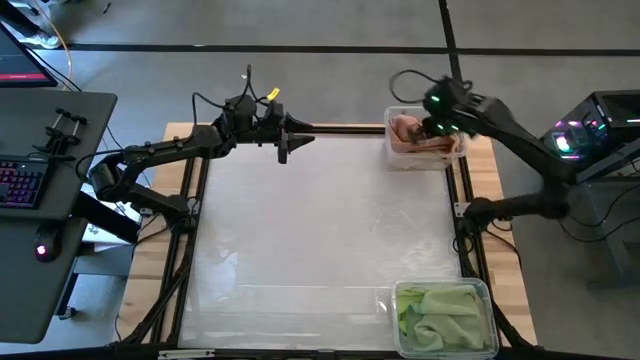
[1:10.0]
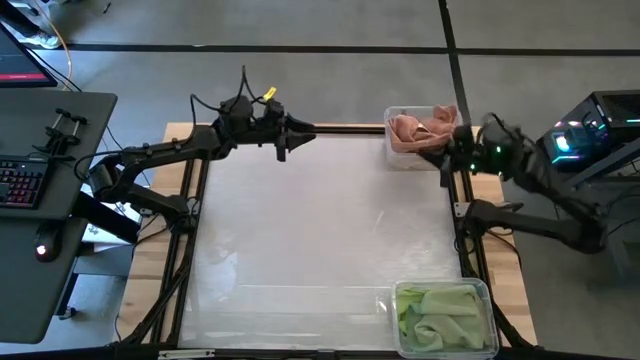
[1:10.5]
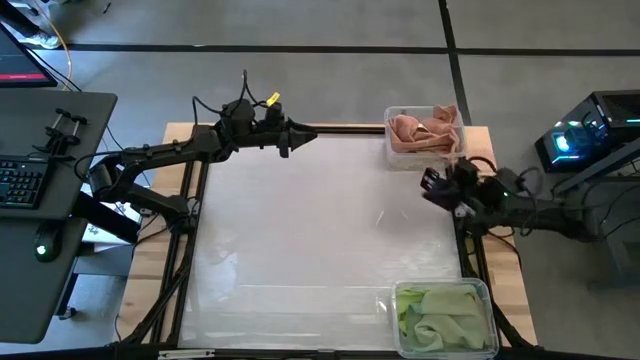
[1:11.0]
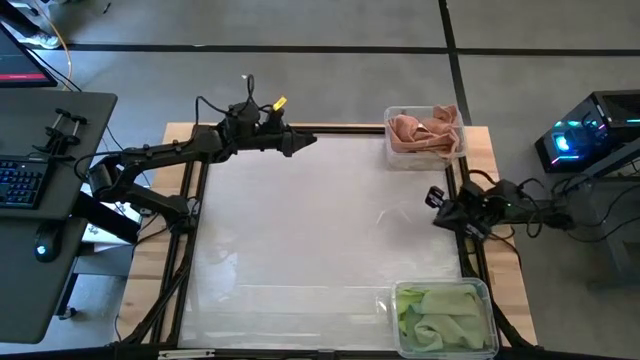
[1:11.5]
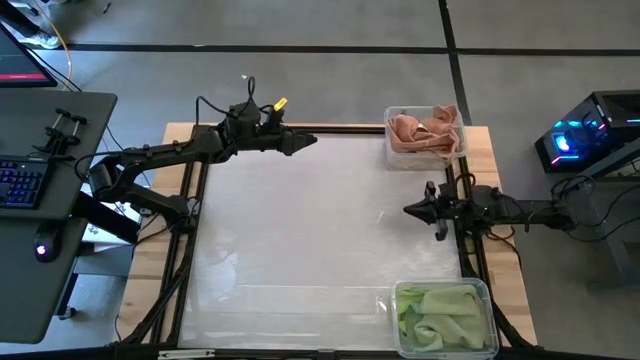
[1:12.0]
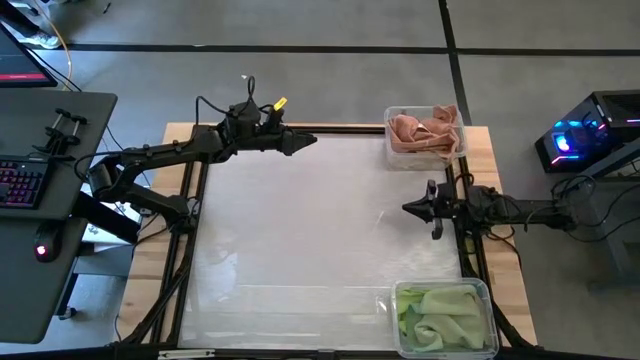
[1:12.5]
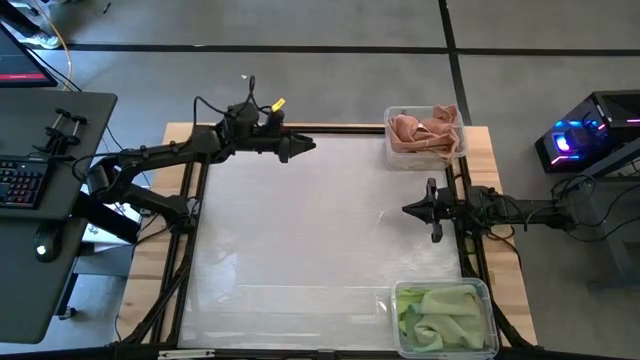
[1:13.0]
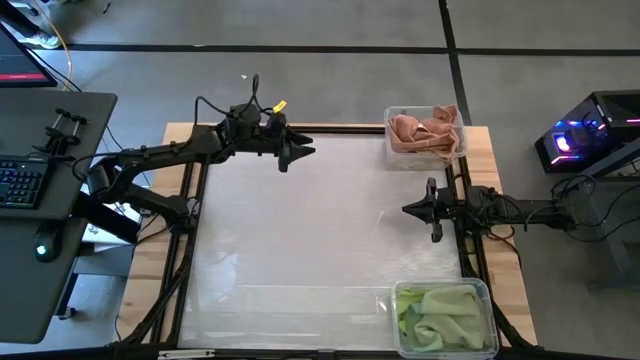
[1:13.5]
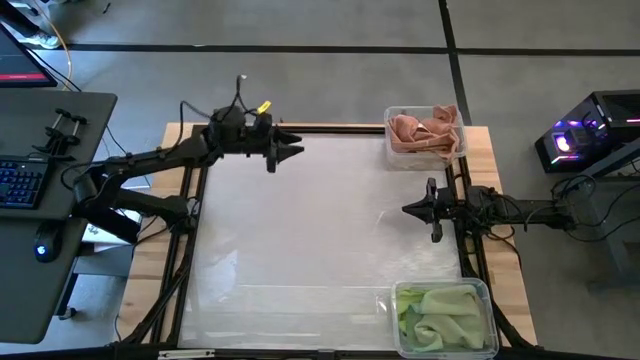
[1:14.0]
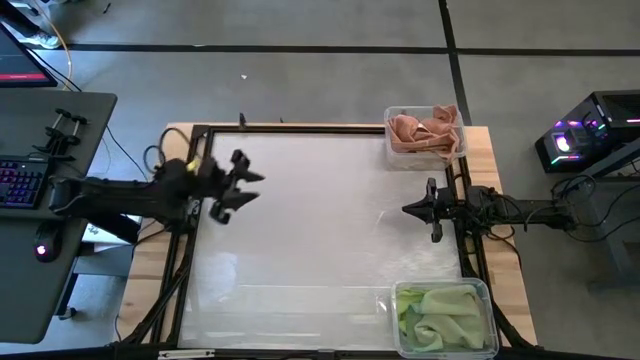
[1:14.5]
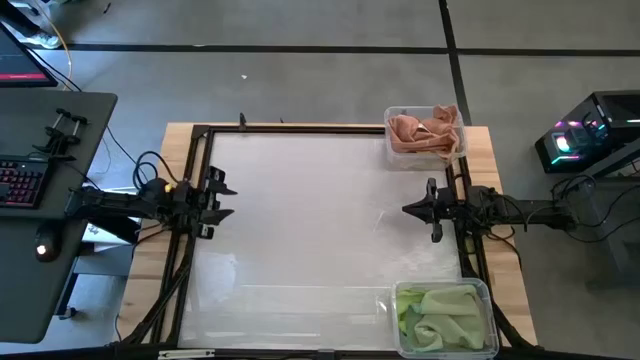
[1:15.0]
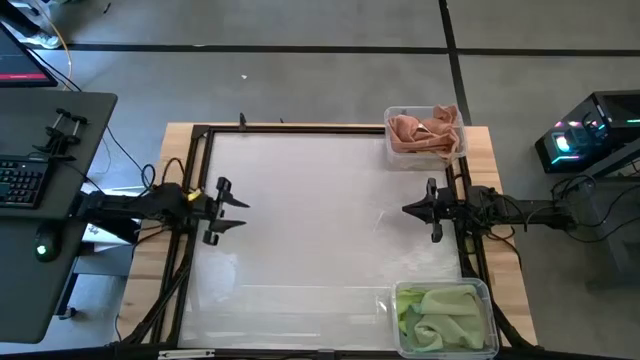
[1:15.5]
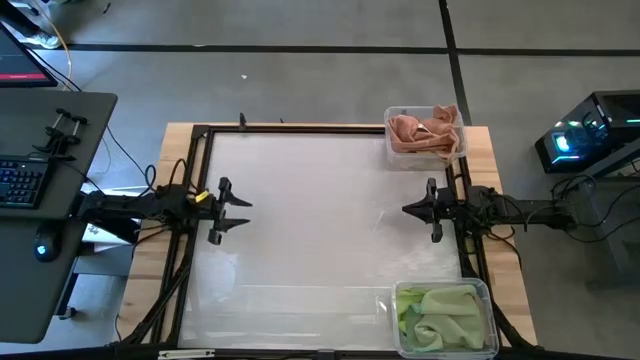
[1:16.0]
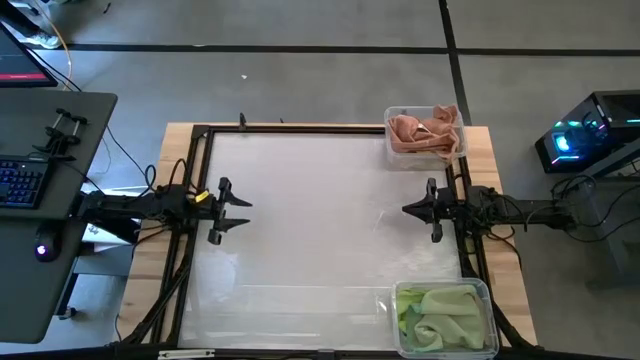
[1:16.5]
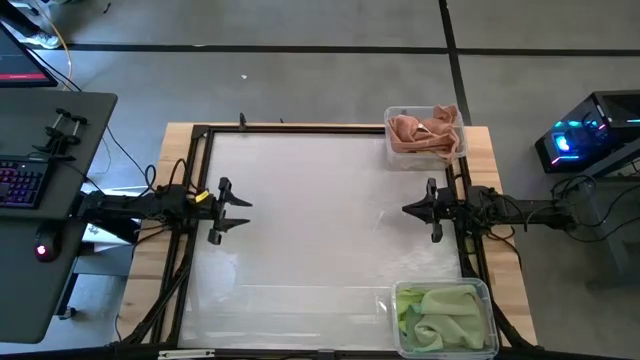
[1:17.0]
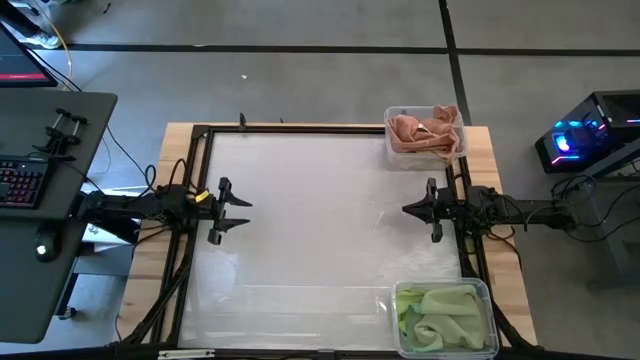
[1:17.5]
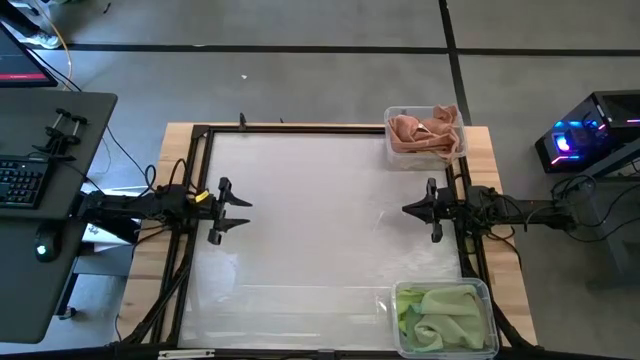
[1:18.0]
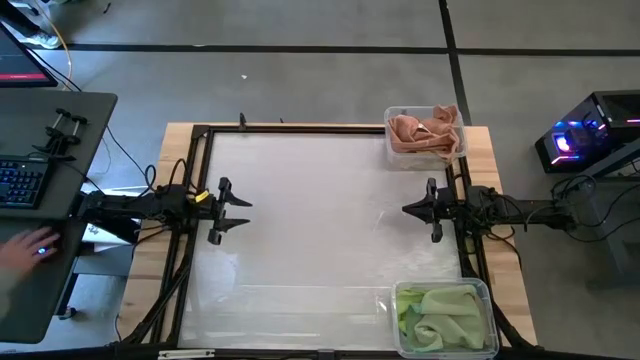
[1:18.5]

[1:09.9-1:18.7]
Task: Sort towels by color in basket
Return to Home Position

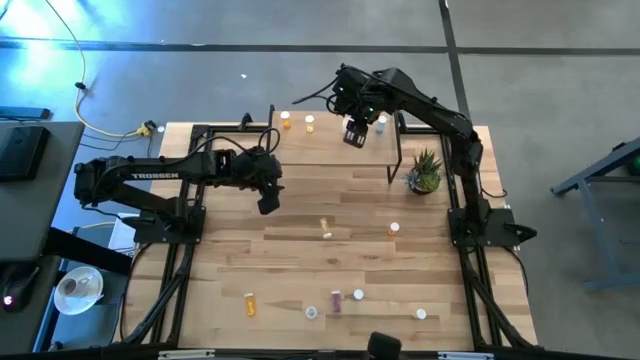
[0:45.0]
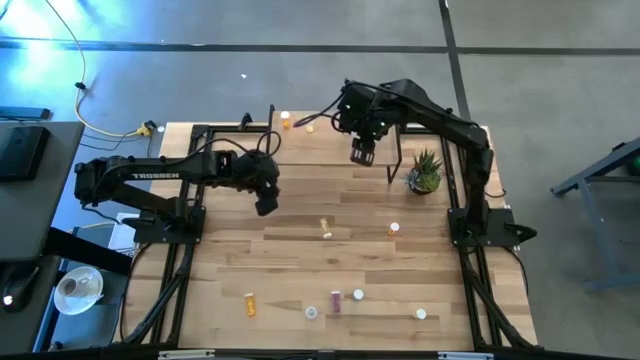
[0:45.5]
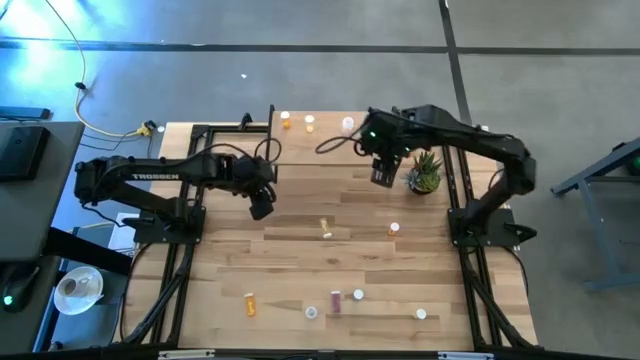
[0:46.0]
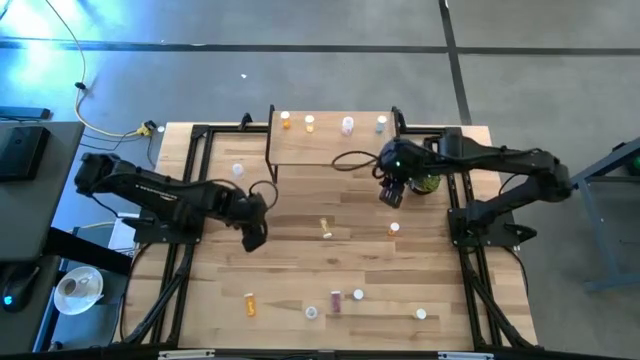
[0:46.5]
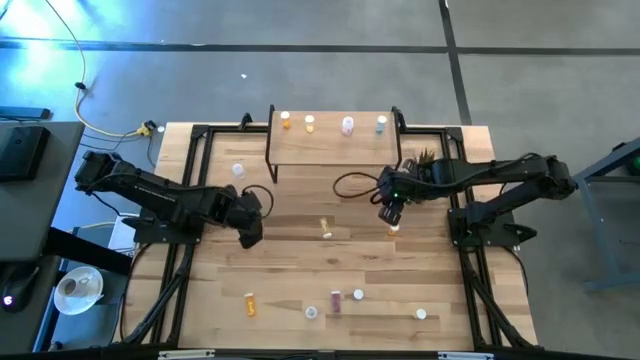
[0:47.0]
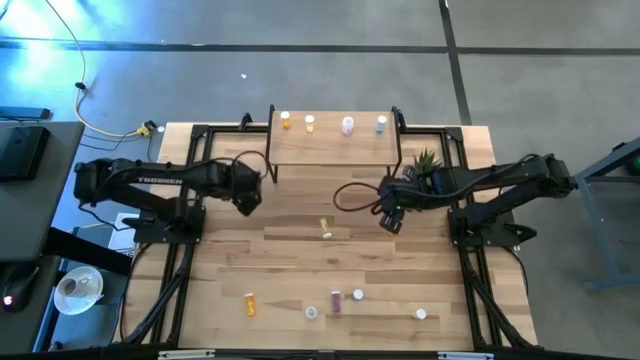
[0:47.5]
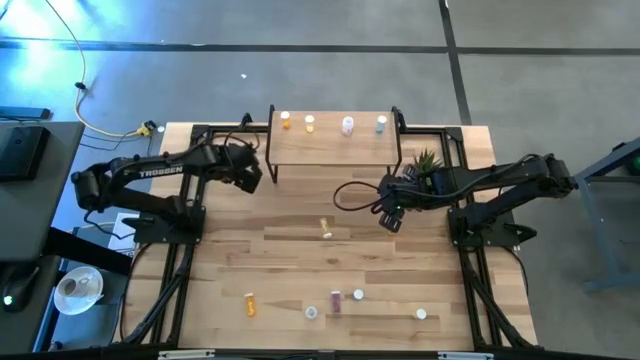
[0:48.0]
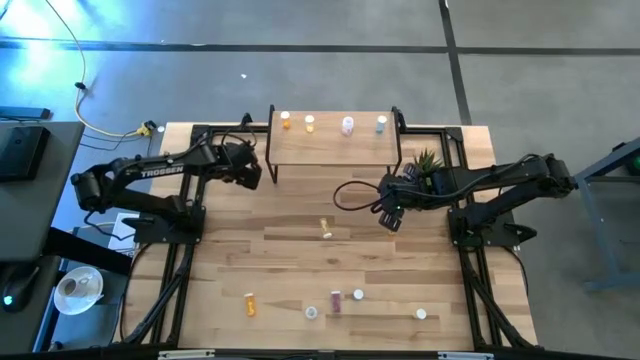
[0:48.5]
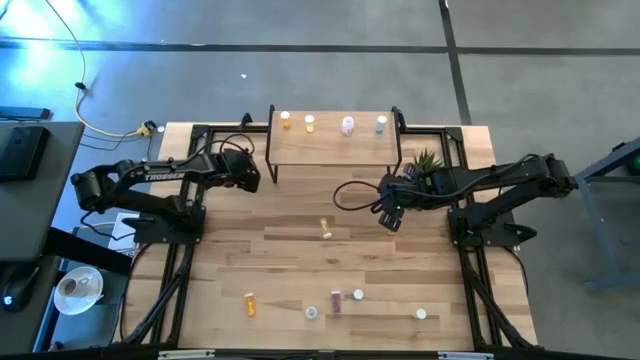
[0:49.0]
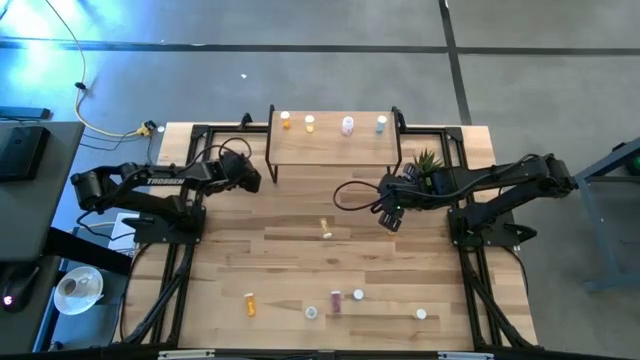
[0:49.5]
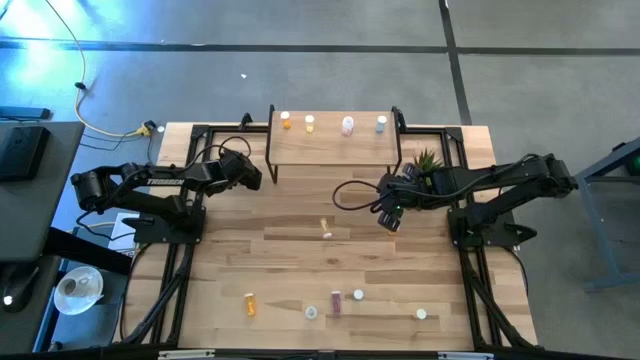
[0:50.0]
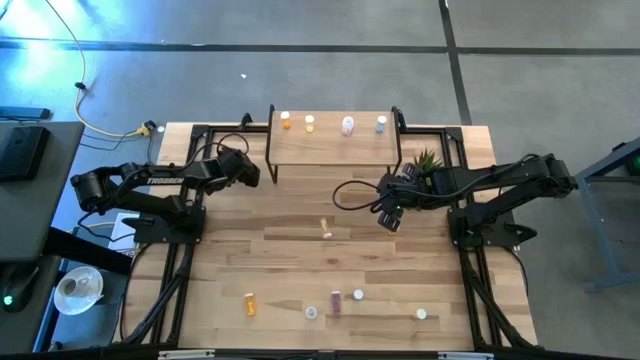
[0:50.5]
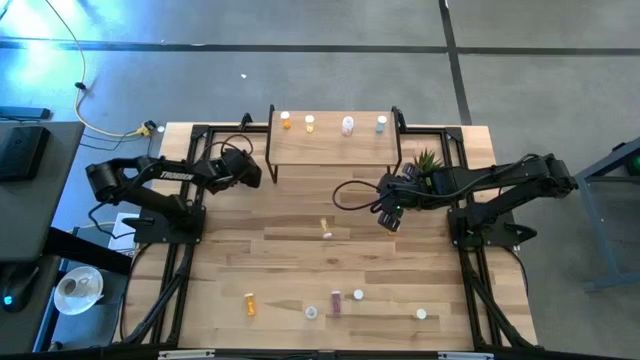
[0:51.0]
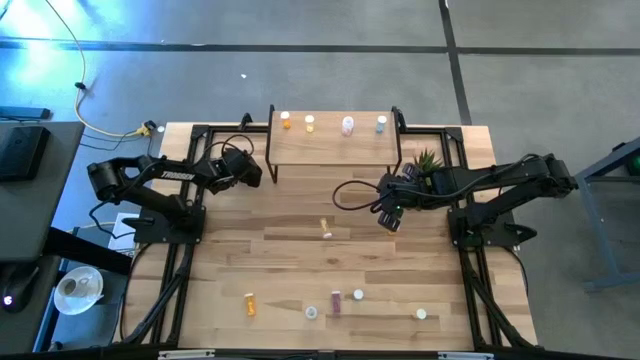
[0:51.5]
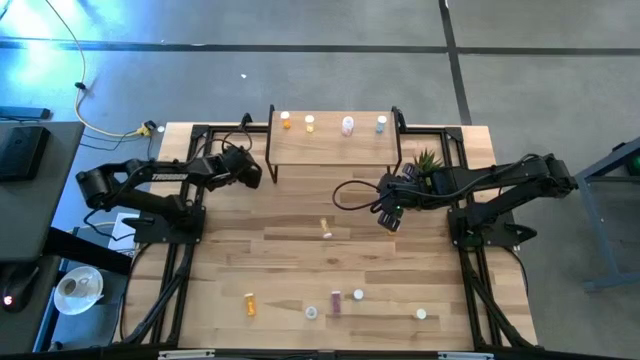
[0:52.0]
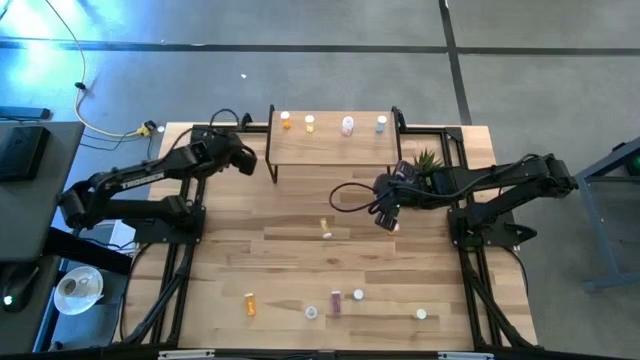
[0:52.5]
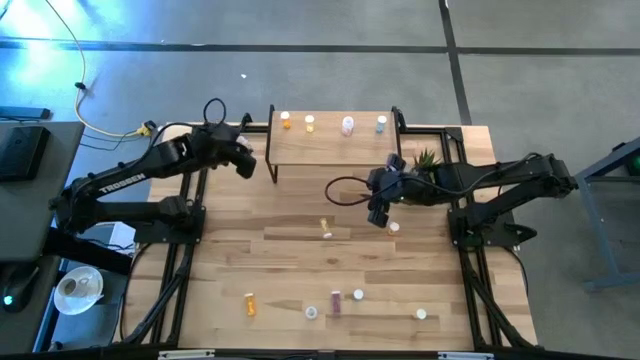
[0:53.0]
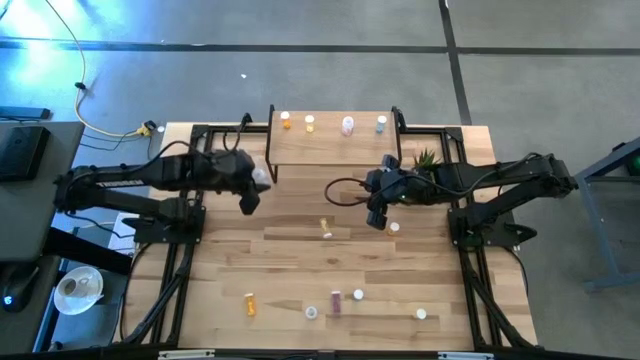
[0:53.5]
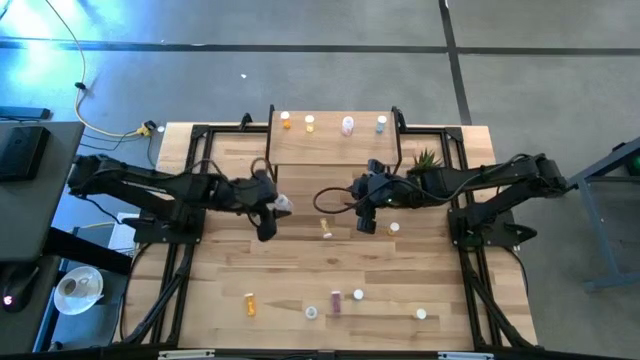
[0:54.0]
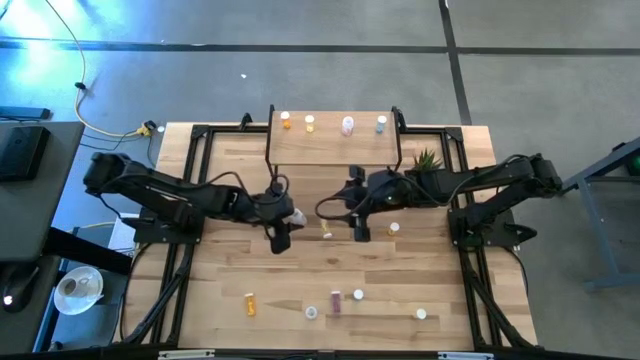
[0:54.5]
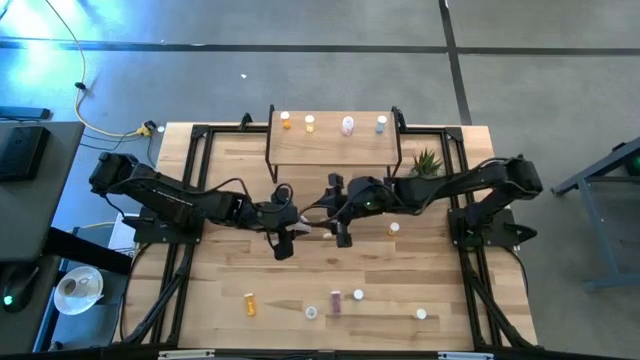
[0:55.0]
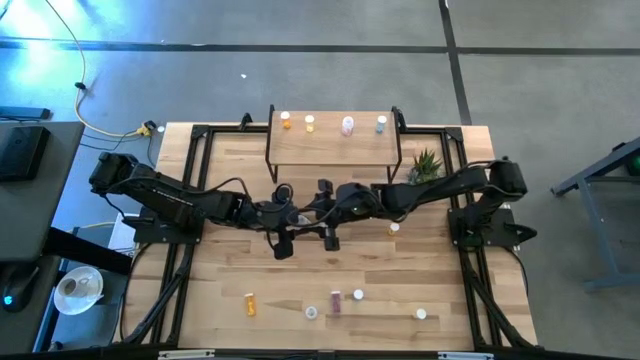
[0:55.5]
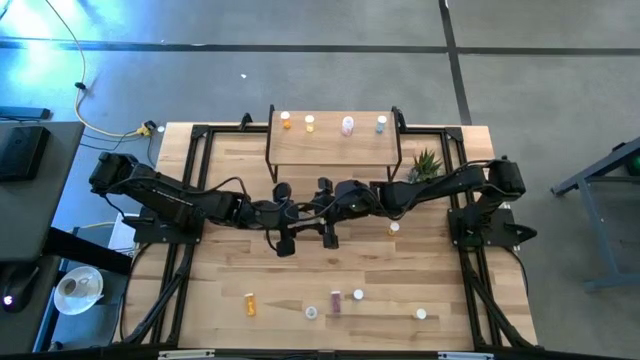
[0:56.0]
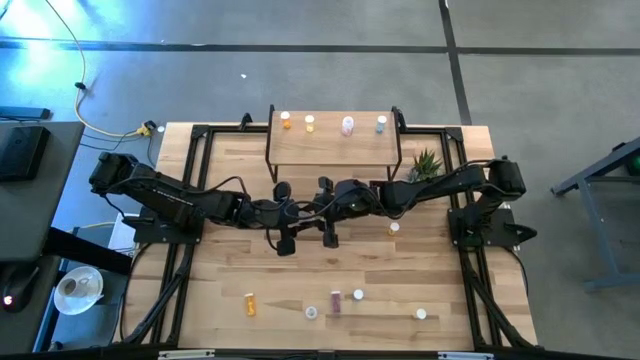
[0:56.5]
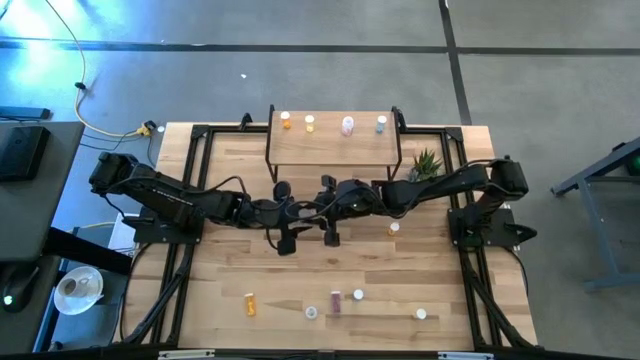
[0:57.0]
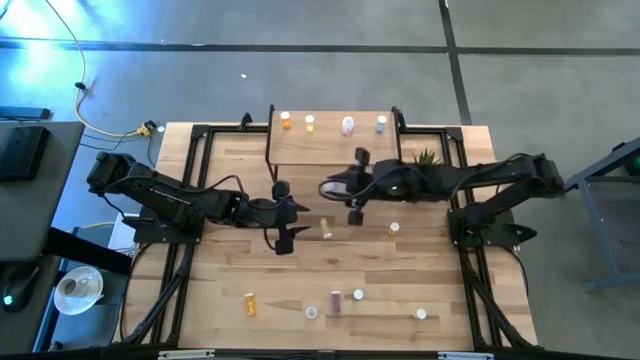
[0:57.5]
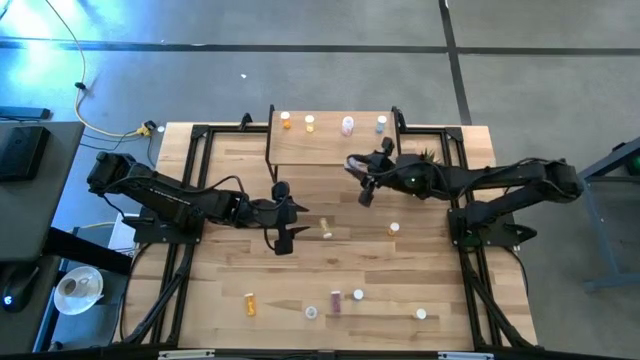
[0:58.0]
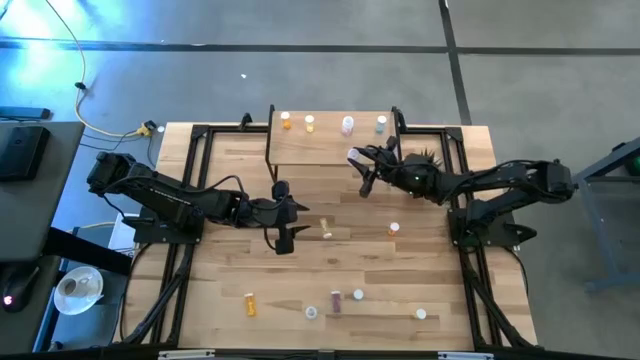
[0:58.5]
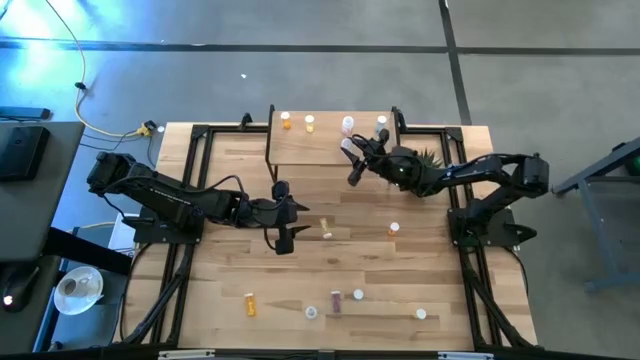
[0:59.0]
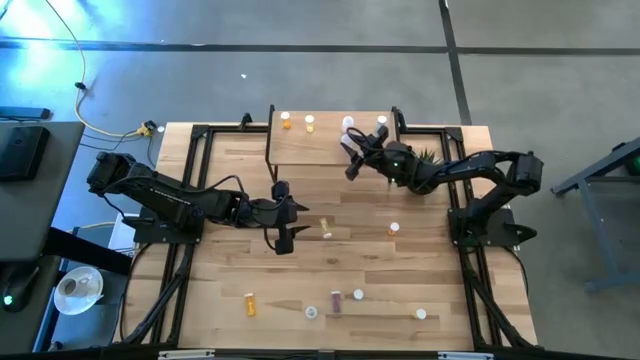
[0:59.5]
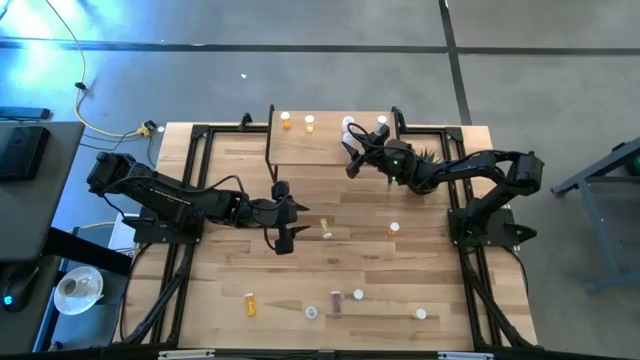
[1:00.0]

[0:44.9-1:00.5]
Task: Pick and place medicine bottles onto shelf by color
Put the top white pill bottle on the shelf aligned with the other white pill bottle
